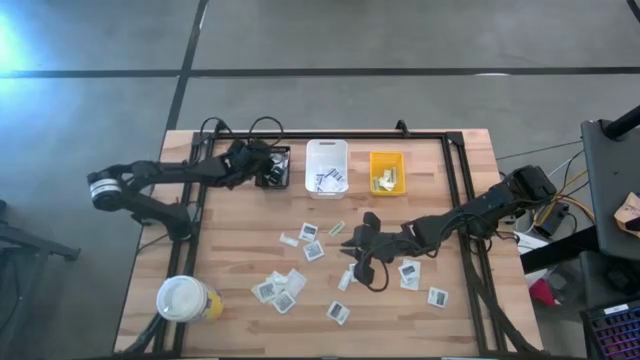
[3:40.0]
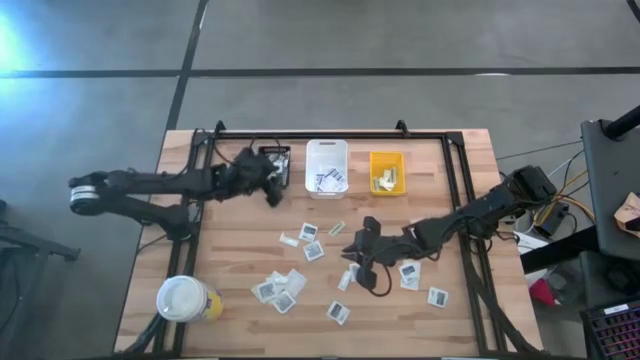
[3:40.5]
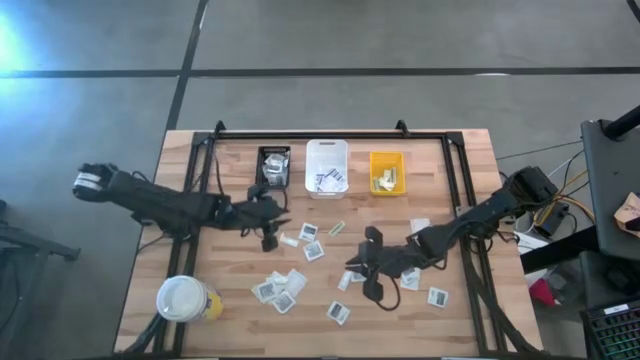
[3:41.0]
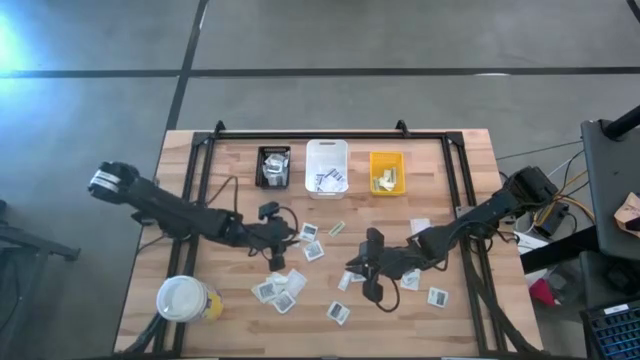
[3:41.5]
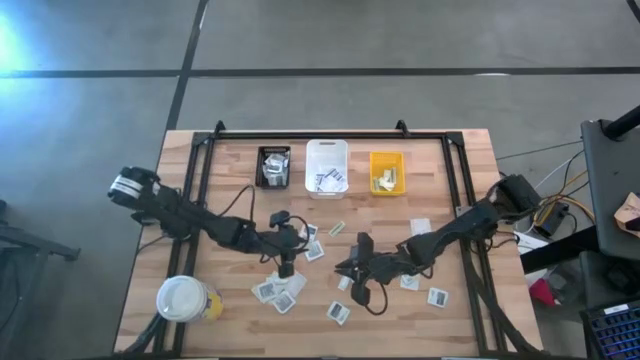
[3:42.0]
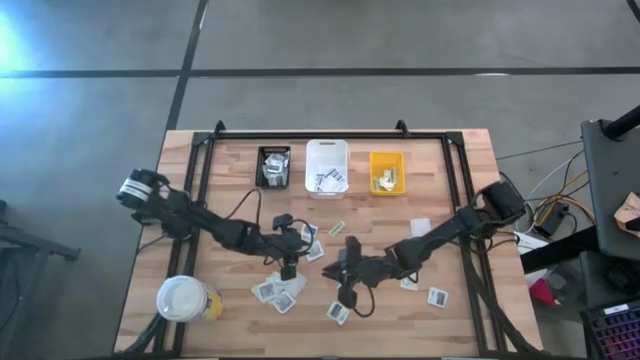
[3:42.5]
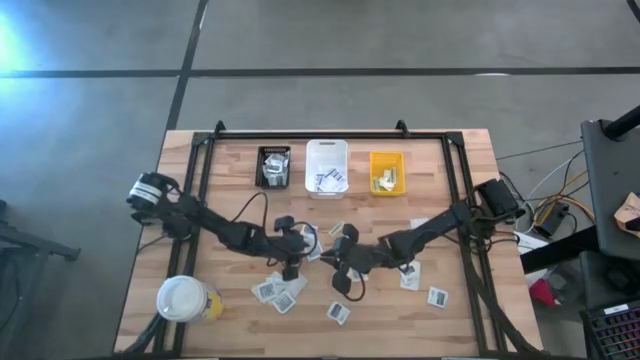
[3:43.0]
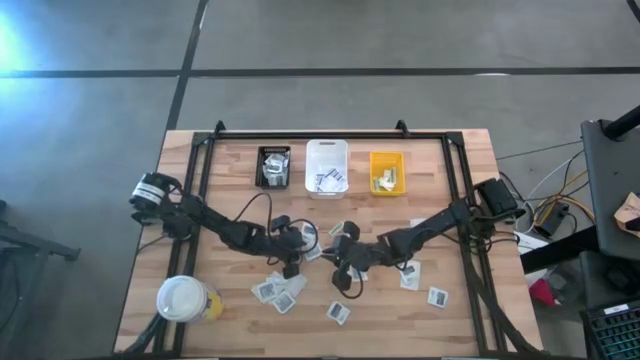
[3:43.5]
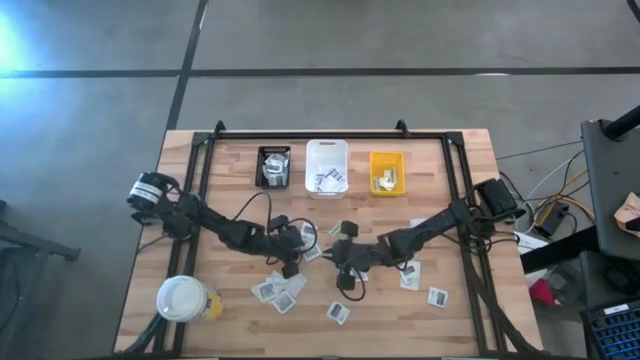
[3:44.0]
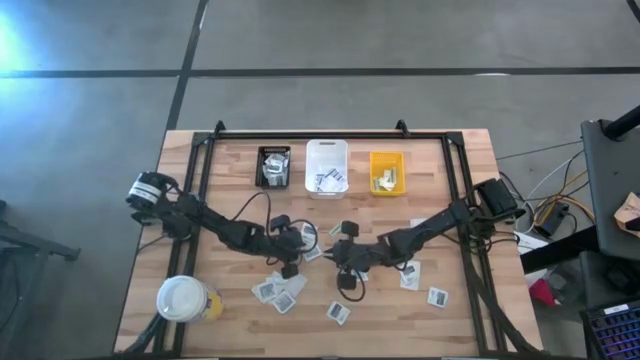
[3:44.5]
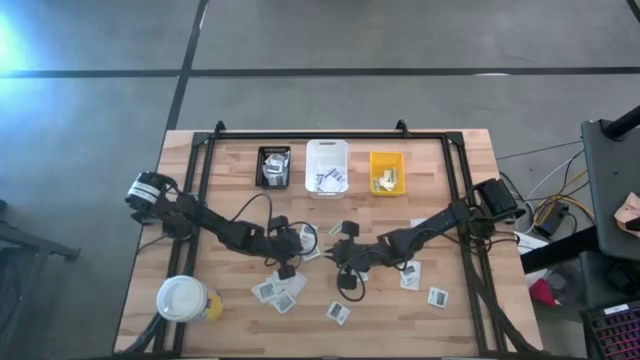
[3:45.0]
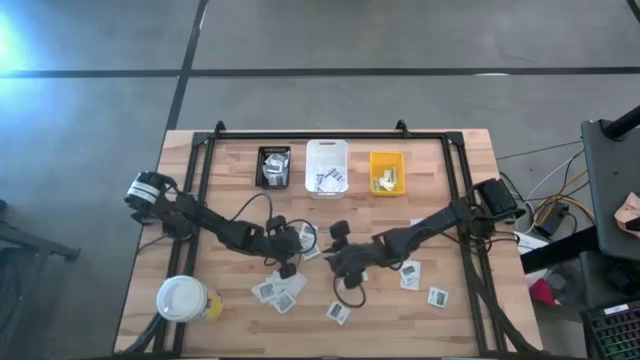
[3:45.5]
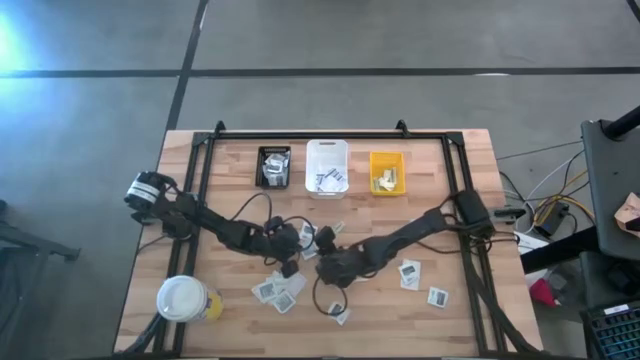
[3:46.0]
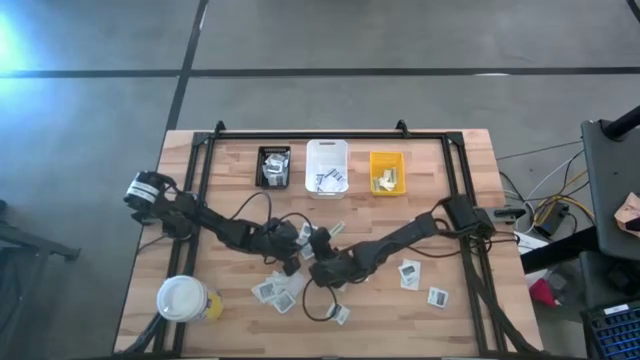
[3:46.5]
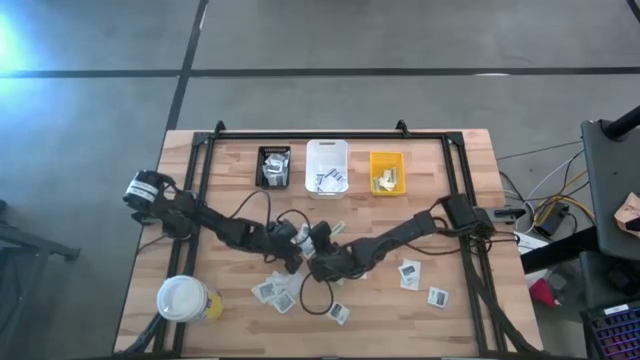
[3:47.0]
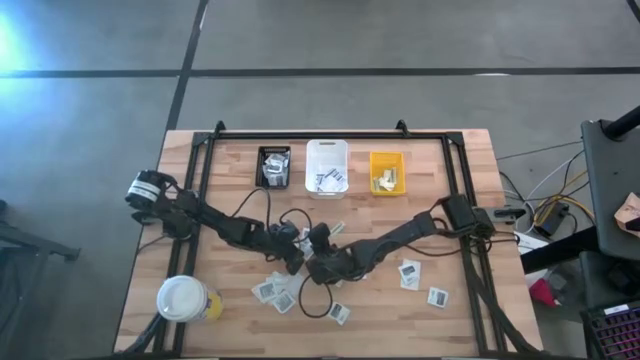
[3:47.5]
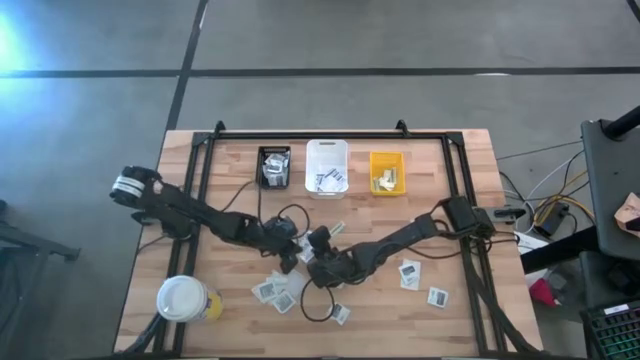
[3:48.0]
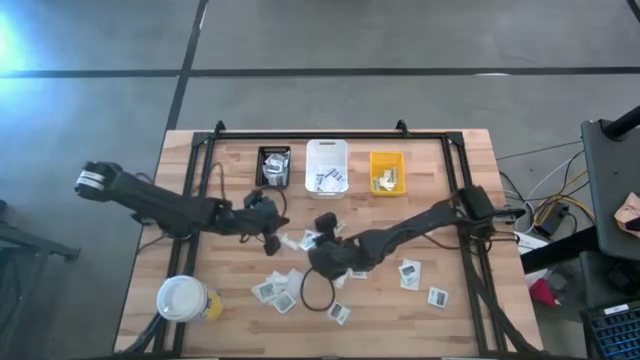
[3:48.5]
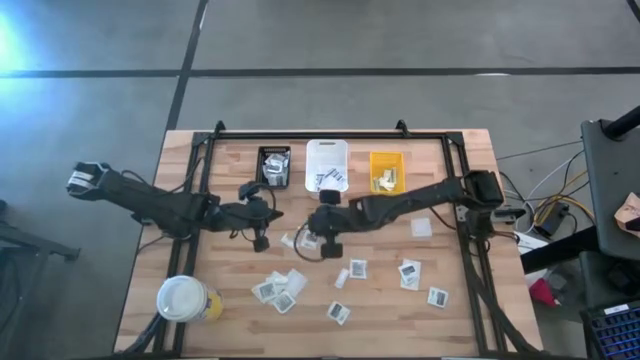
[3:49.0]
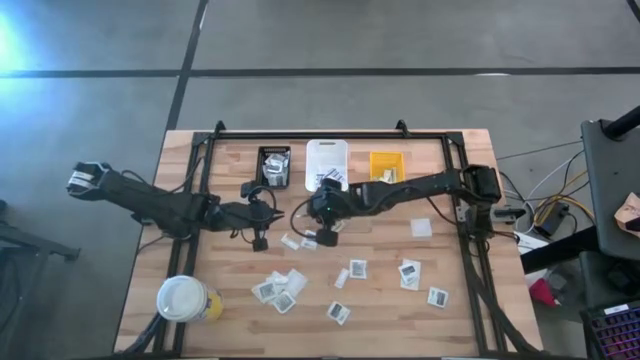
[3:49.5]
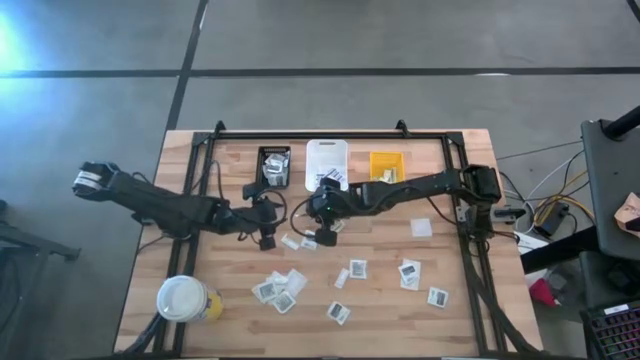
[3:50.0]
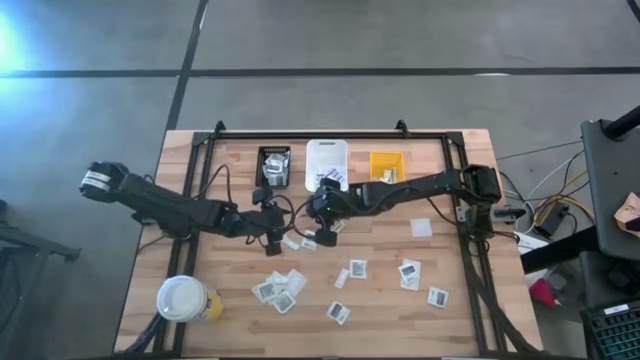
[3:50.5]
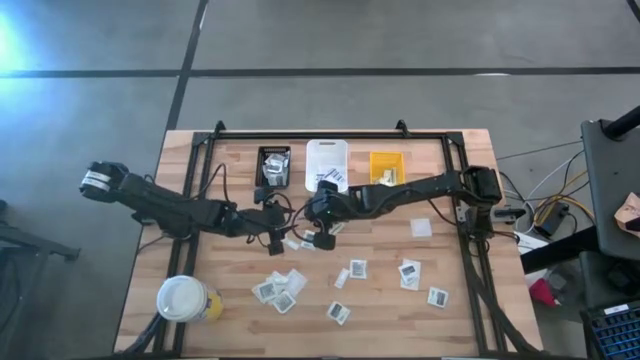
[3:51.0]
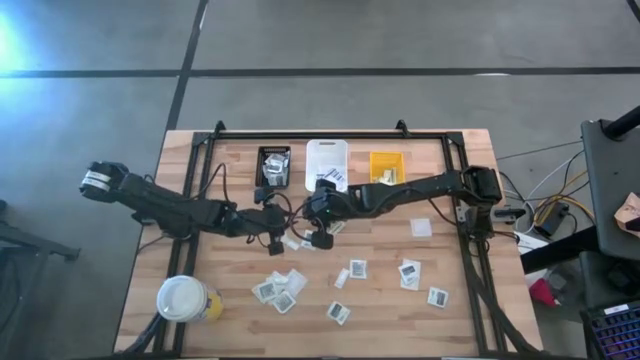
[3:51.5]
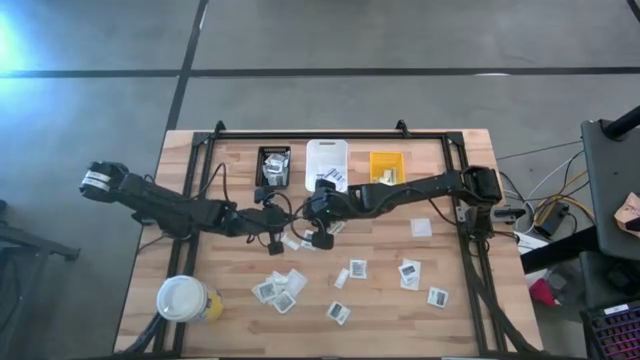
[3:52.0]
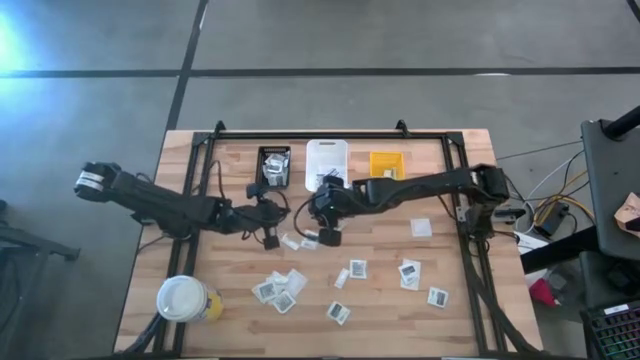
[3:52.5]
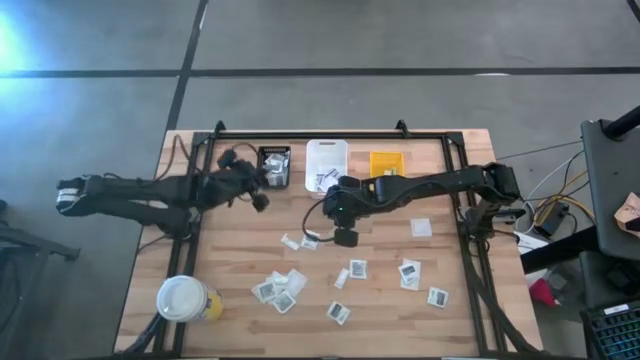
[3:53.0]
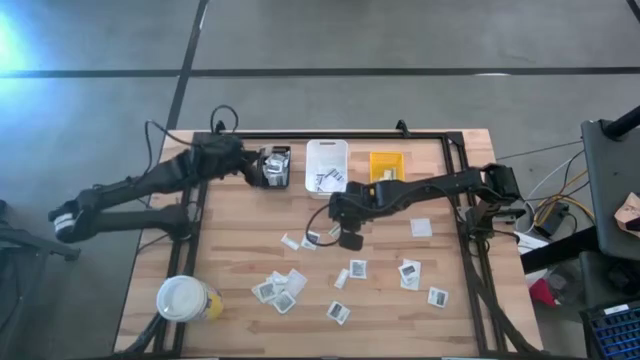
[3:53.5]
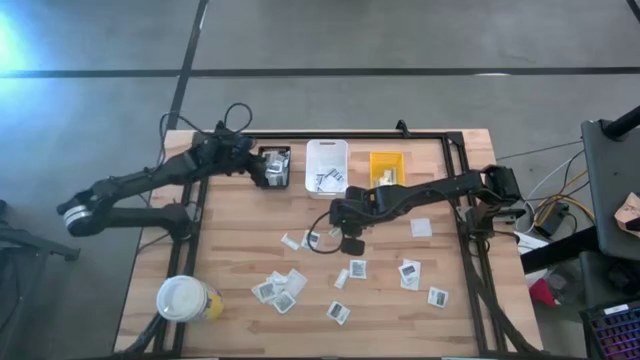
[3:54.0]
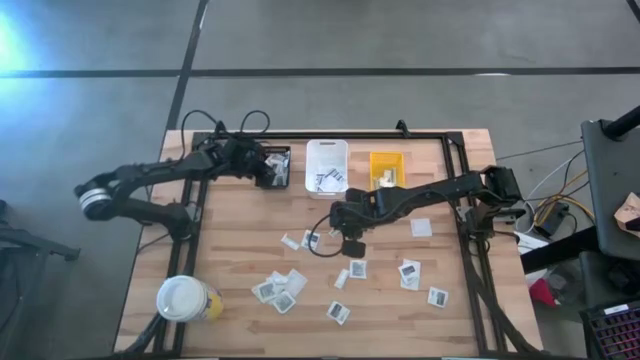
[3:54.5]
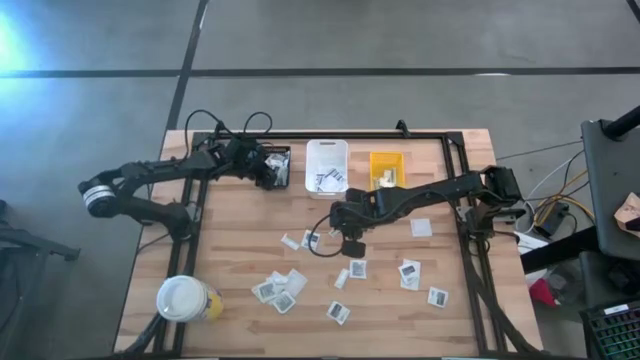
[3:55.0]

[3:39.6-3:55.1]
Task: Pick & Place First Aid Supplies
Put the towelette pack into the black basket

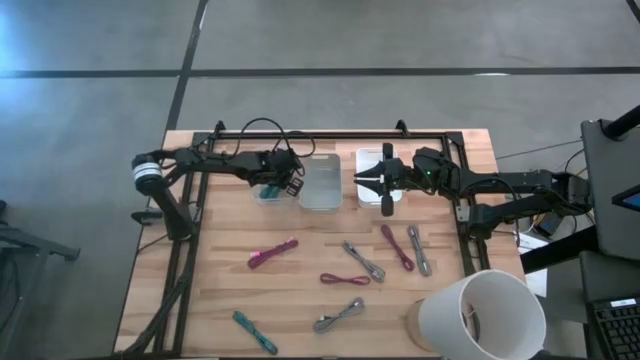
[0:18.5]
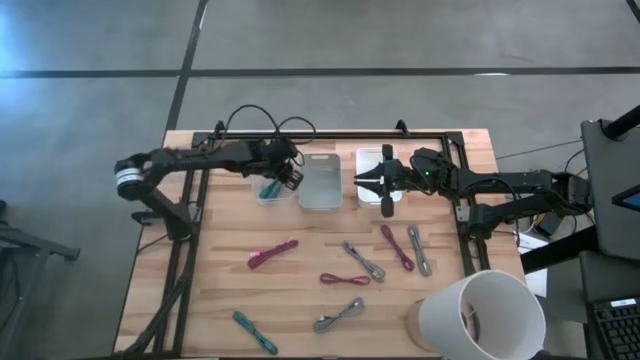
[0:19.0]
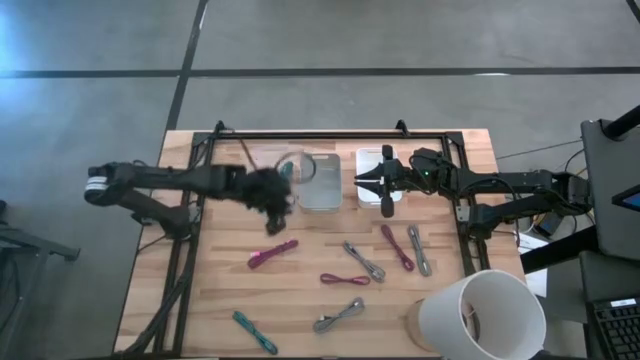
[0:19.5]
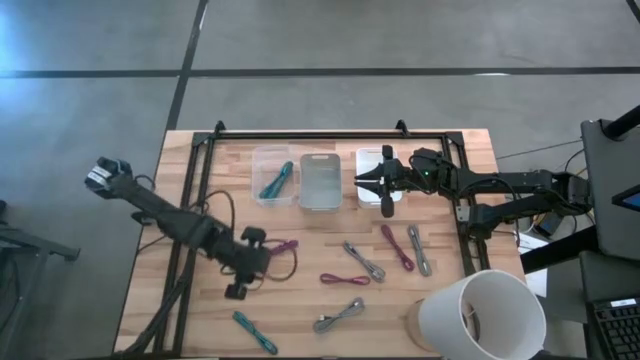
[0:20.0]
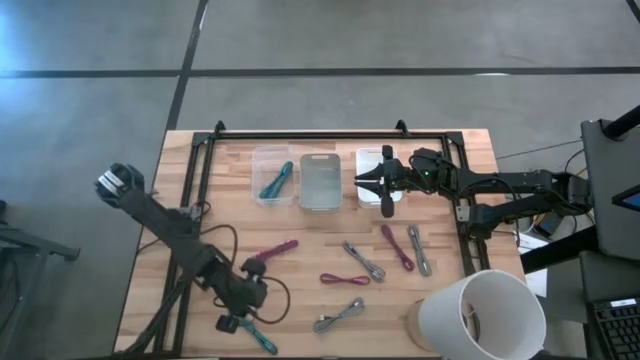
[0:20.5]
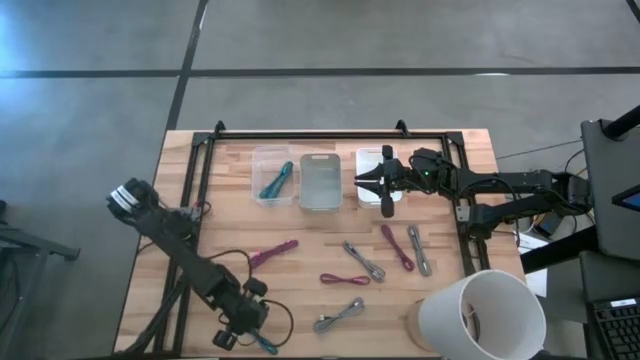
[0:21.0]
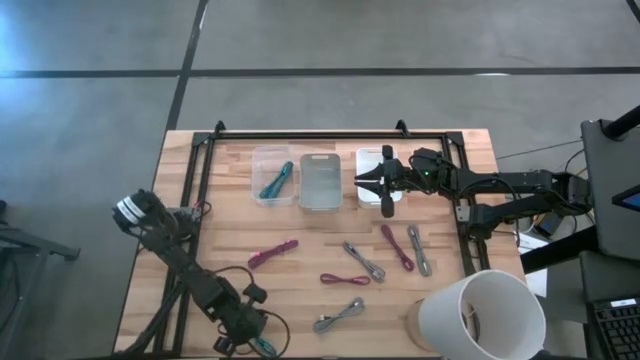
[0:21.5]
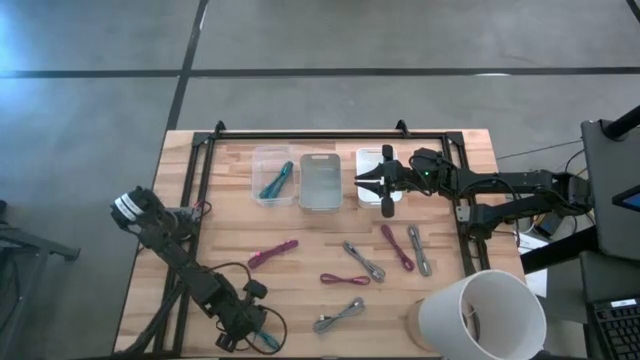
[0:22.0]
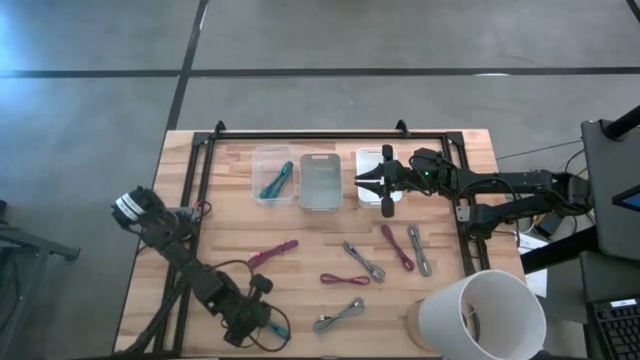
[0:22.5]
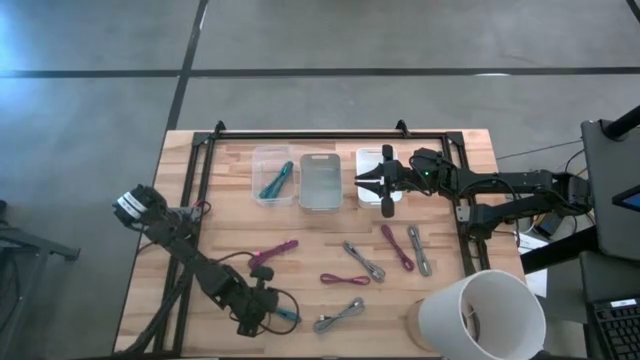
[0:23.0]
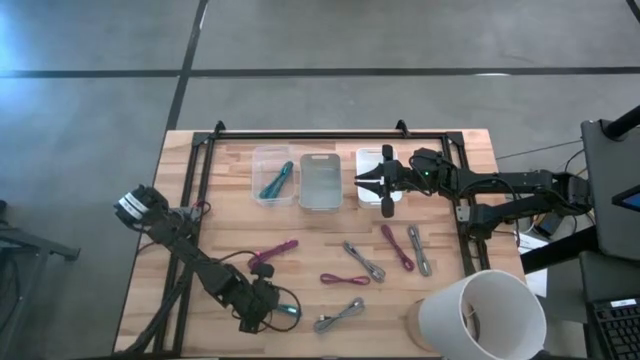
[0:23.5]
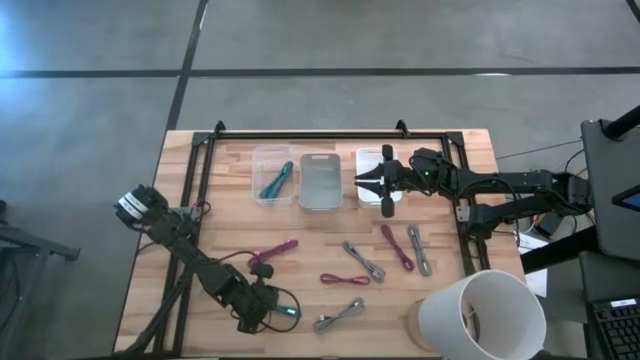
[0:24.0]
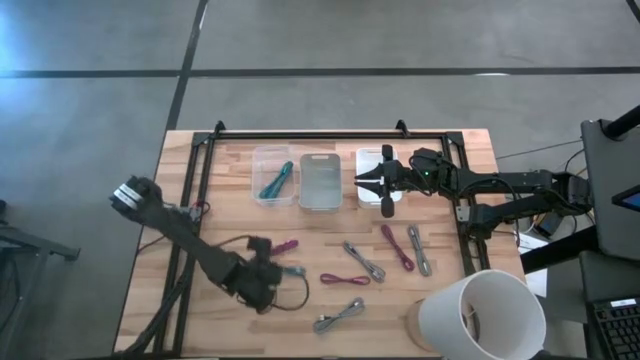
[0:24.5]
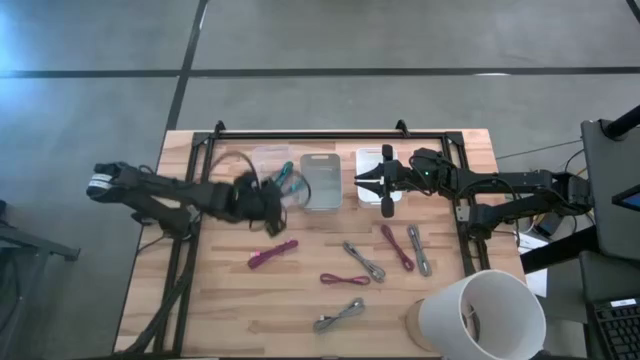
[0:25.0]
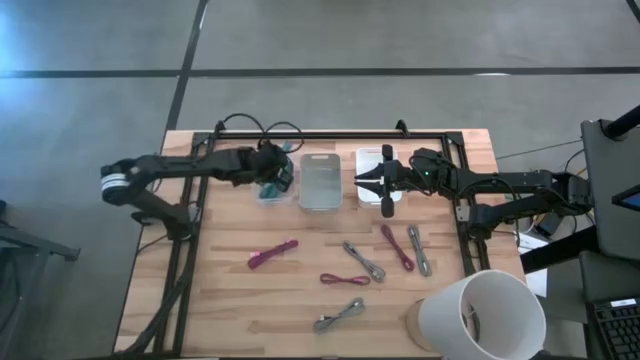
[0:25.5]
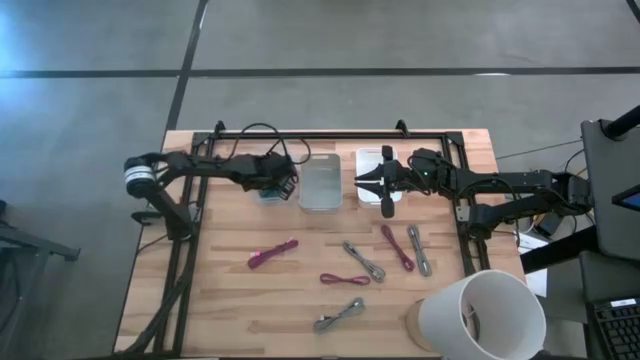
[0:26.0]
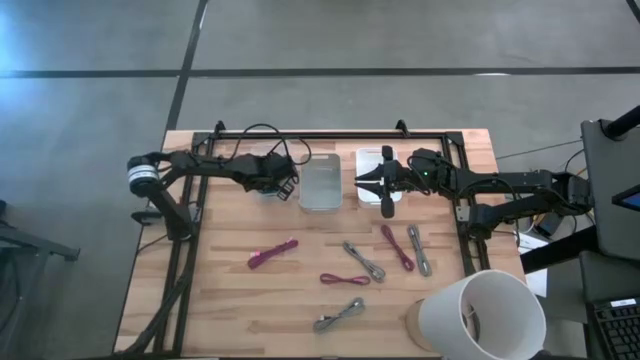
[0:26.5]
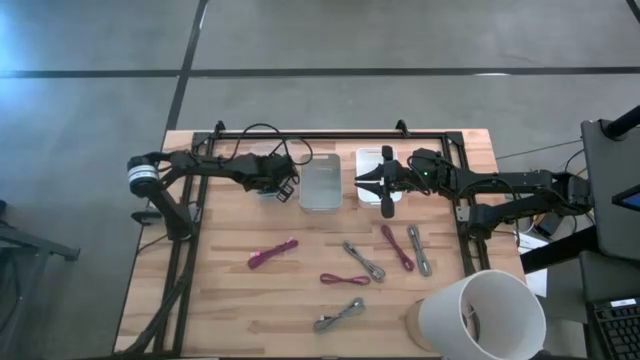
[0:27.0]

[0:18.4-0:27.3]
Task: Pick & Place USB Port
Put the blue charger cable into the transparent bin
